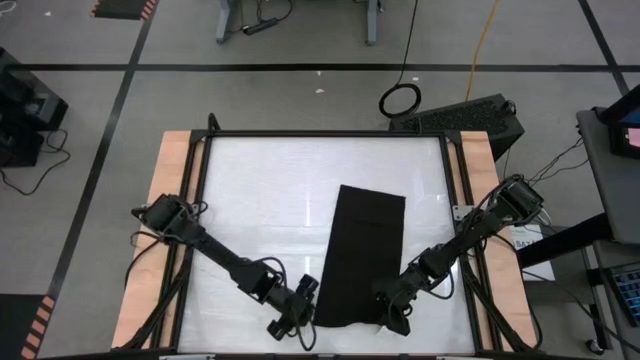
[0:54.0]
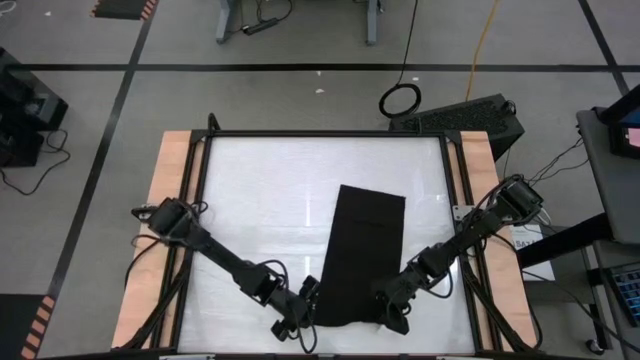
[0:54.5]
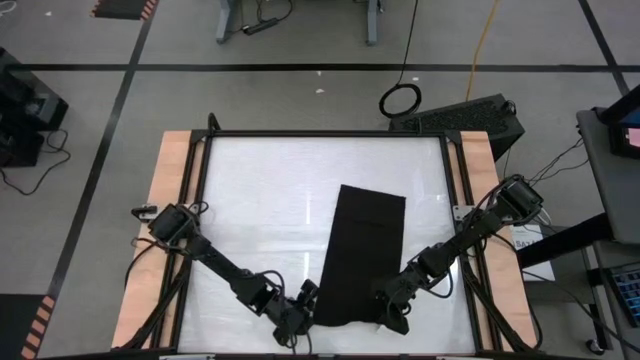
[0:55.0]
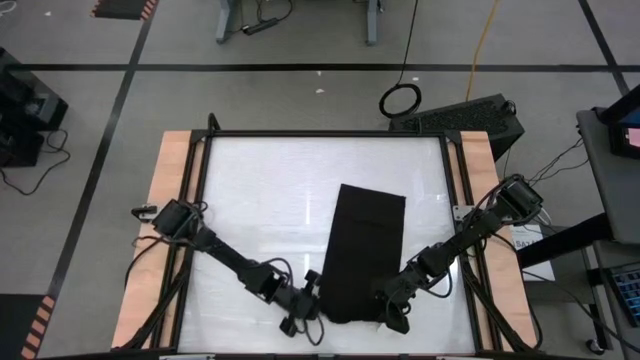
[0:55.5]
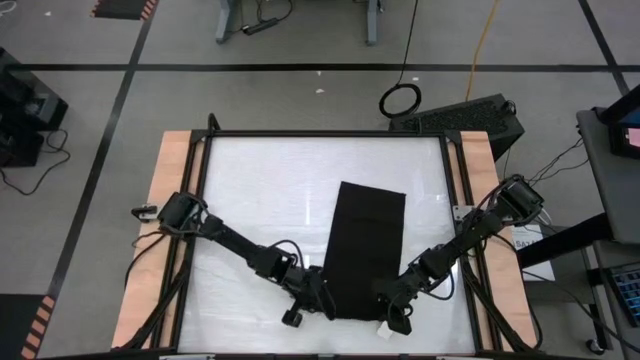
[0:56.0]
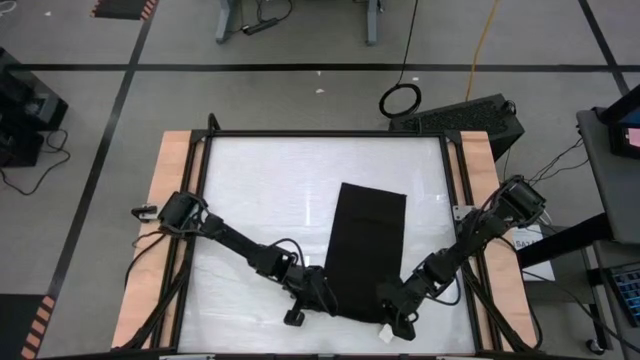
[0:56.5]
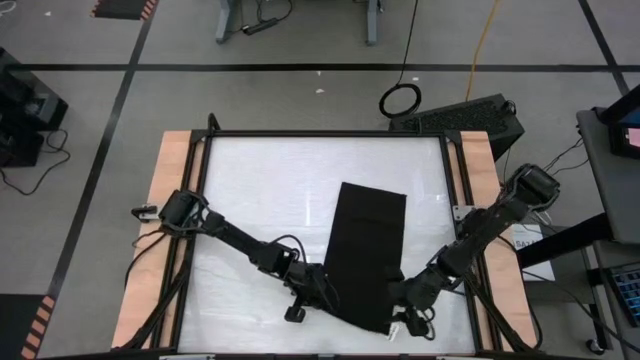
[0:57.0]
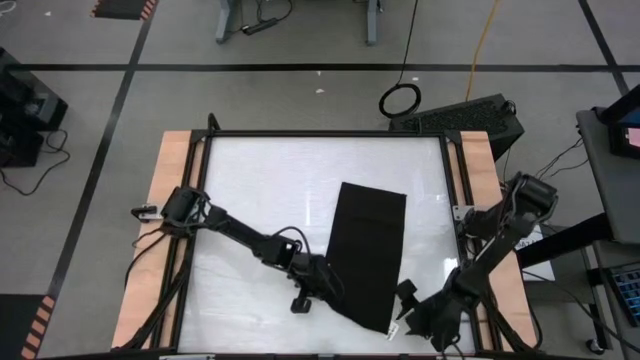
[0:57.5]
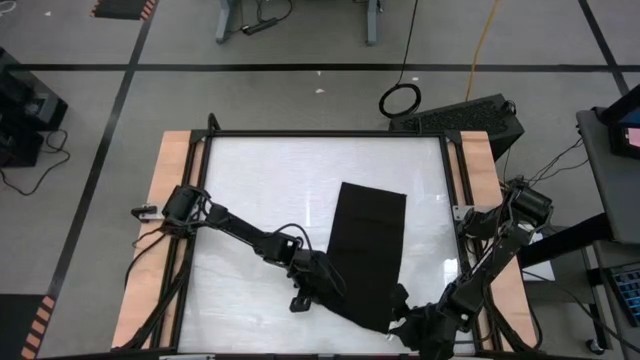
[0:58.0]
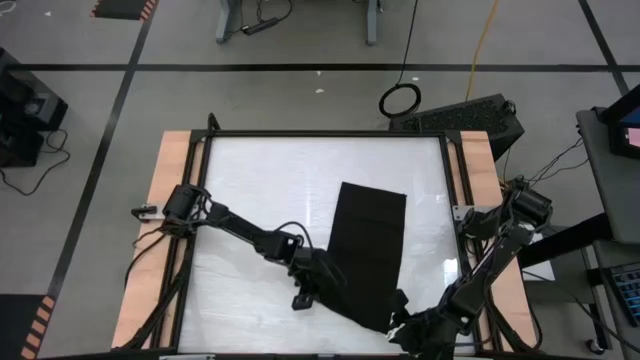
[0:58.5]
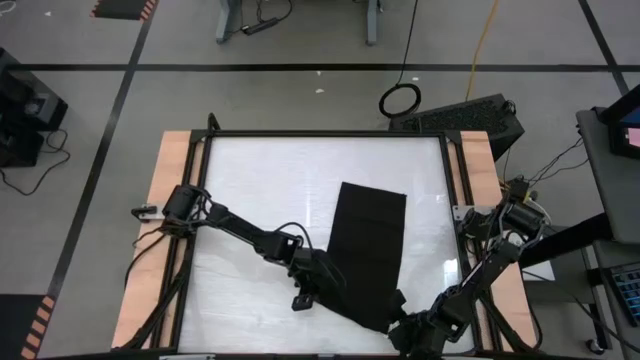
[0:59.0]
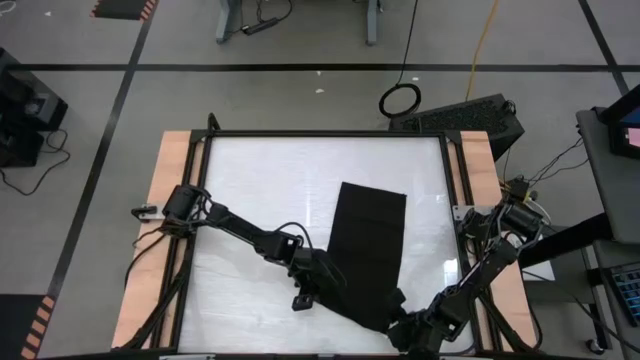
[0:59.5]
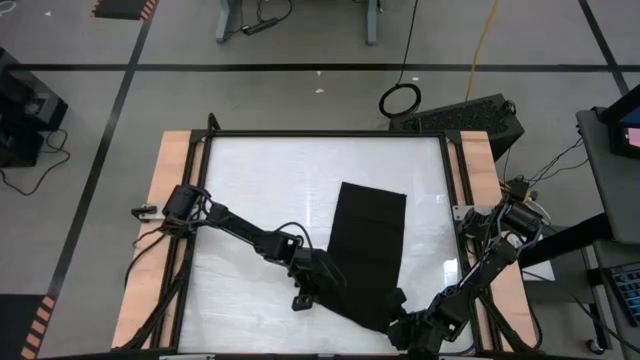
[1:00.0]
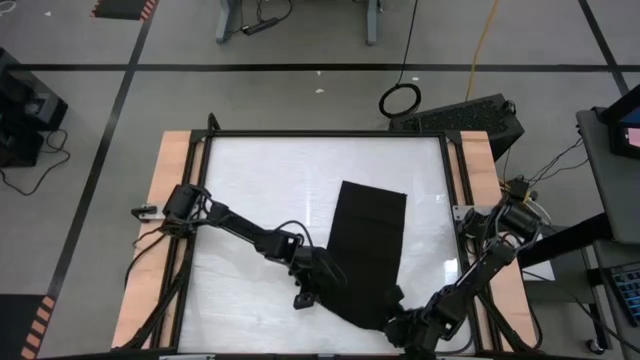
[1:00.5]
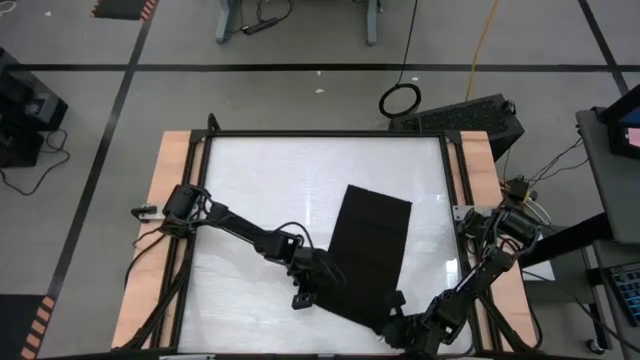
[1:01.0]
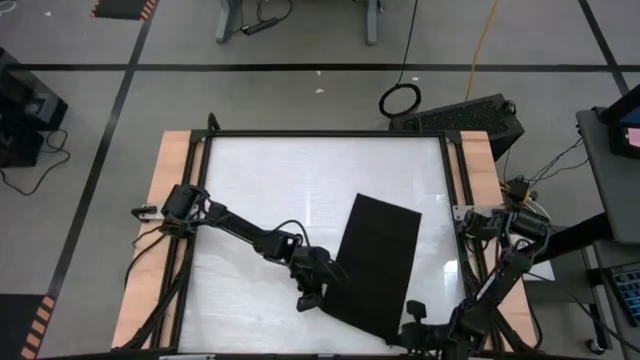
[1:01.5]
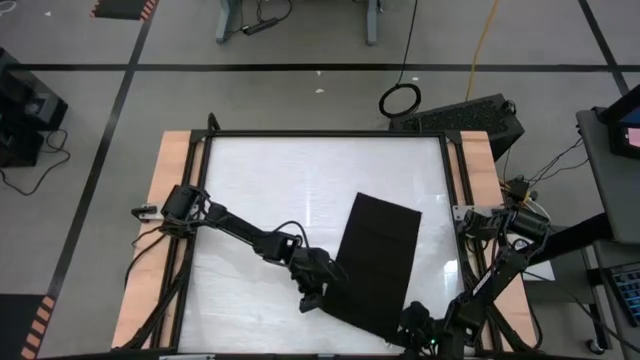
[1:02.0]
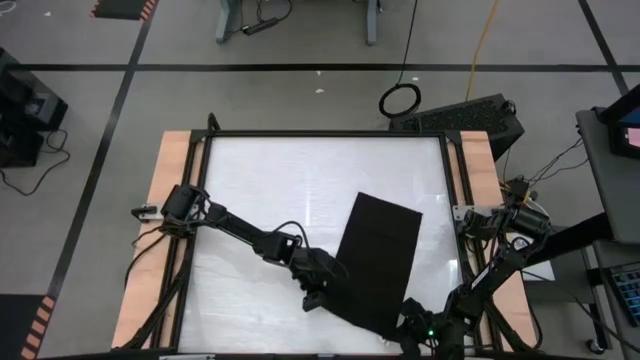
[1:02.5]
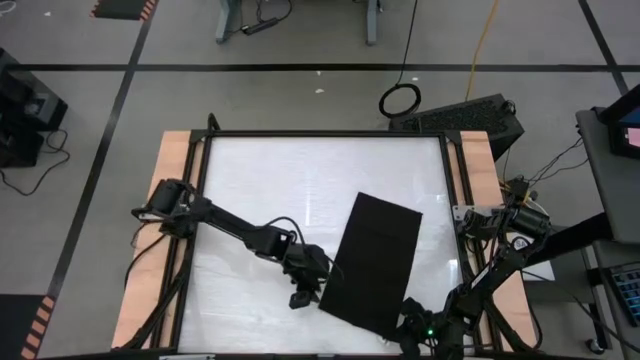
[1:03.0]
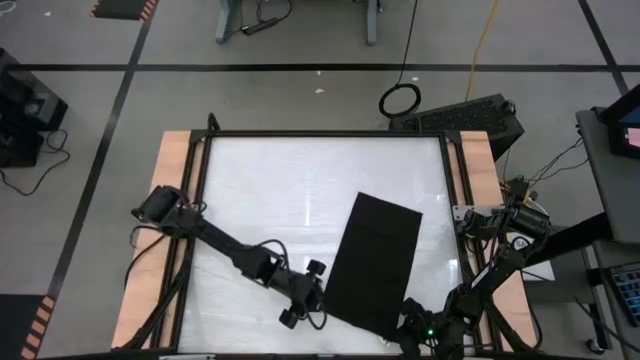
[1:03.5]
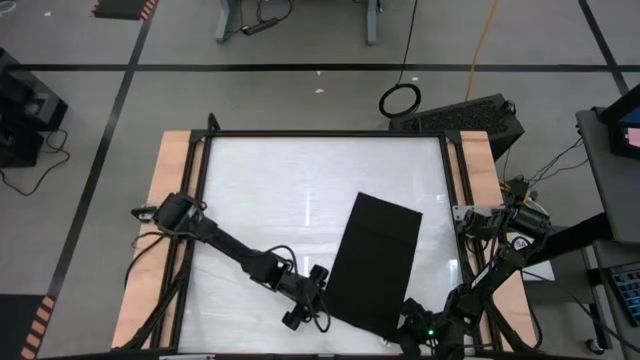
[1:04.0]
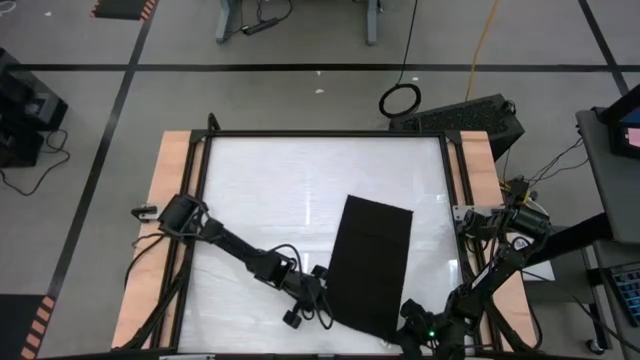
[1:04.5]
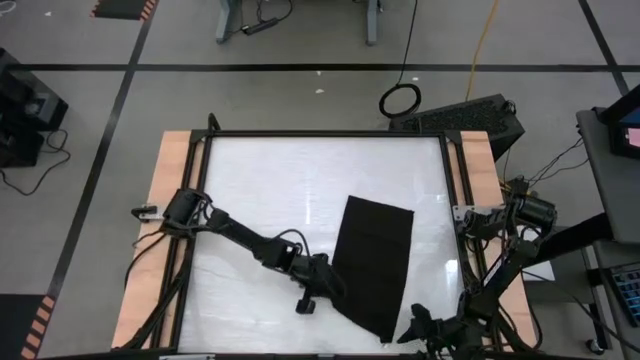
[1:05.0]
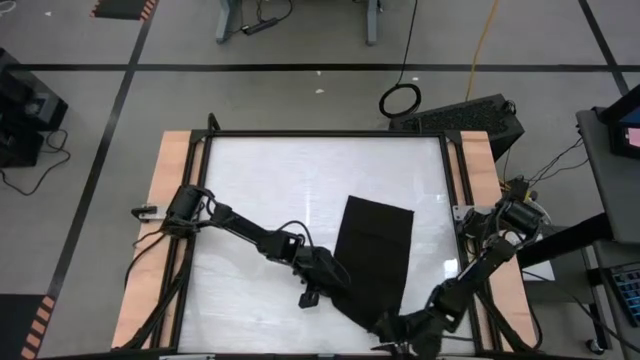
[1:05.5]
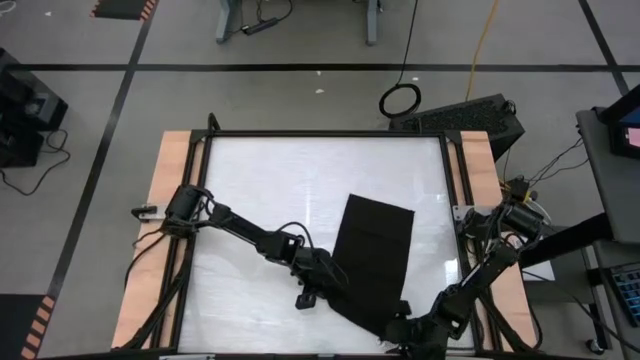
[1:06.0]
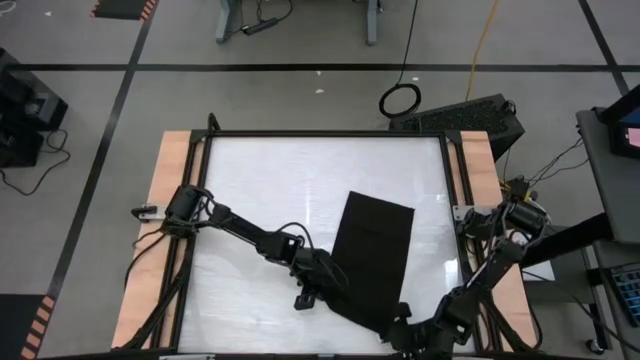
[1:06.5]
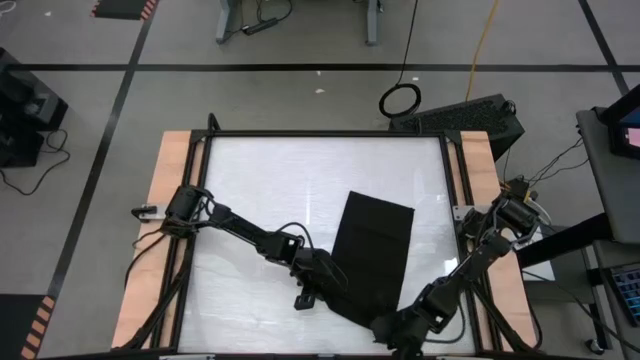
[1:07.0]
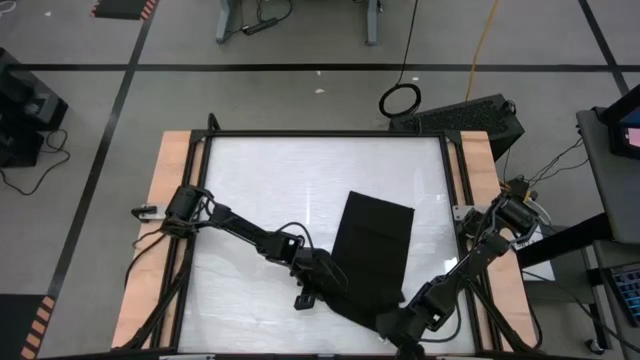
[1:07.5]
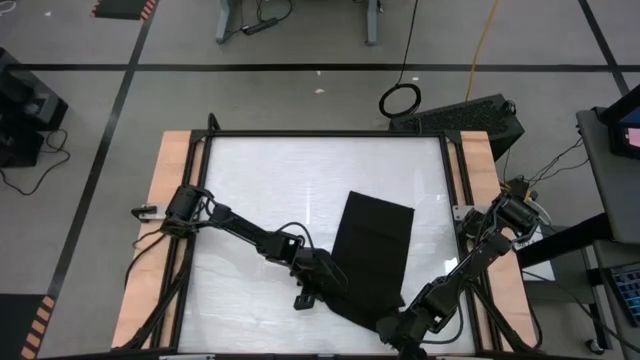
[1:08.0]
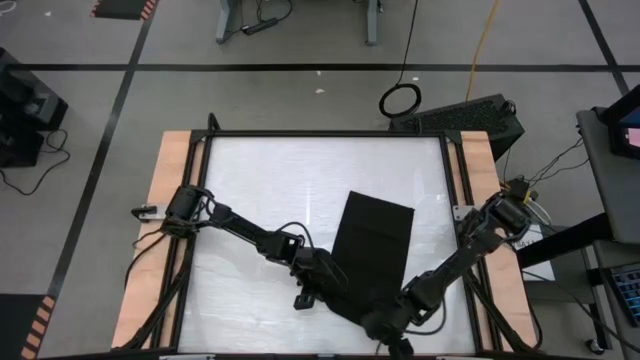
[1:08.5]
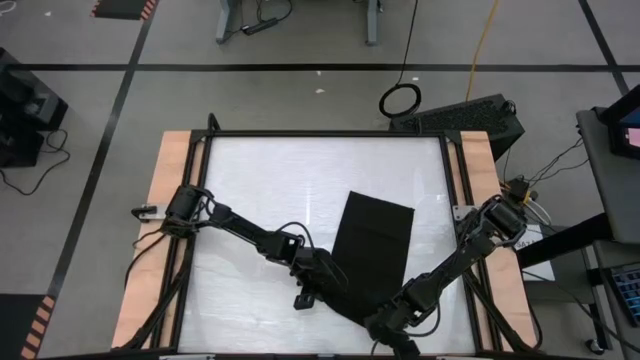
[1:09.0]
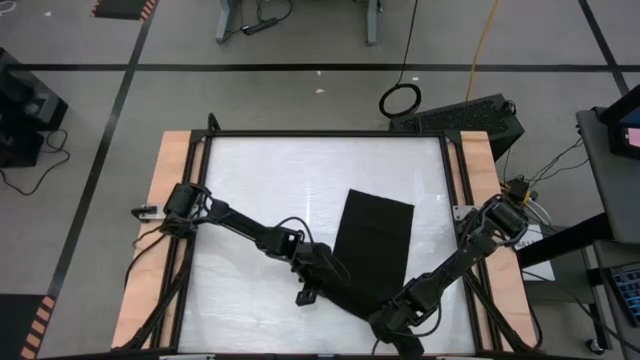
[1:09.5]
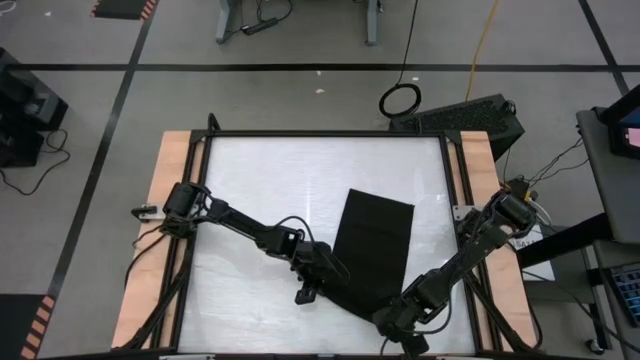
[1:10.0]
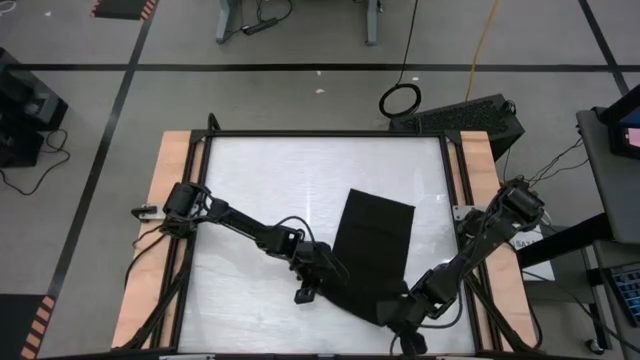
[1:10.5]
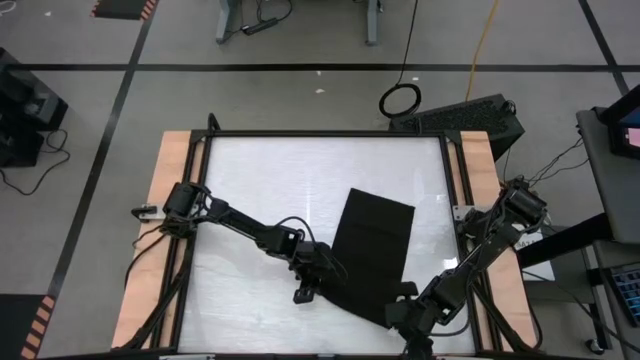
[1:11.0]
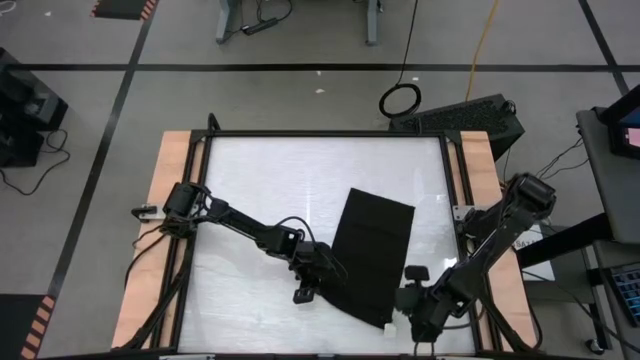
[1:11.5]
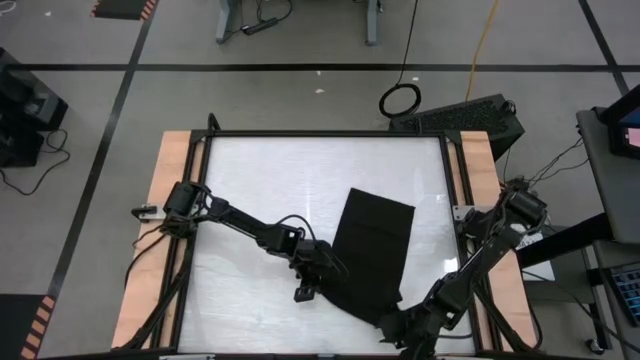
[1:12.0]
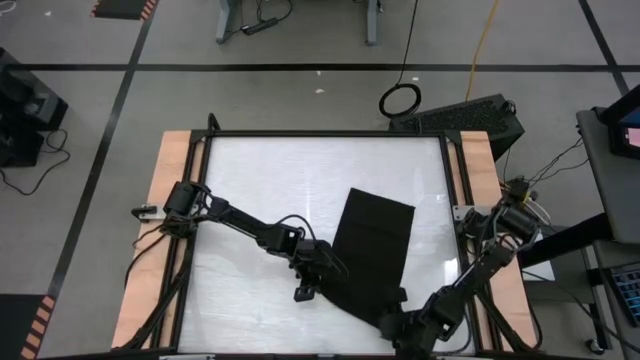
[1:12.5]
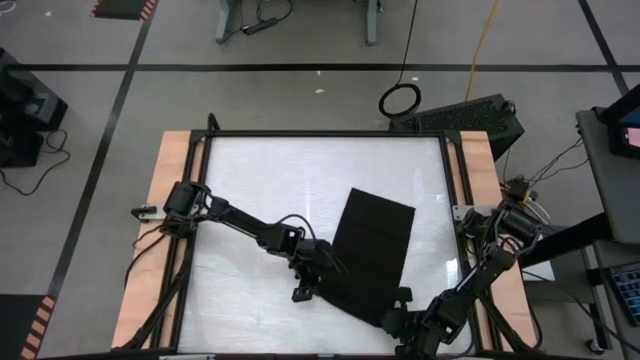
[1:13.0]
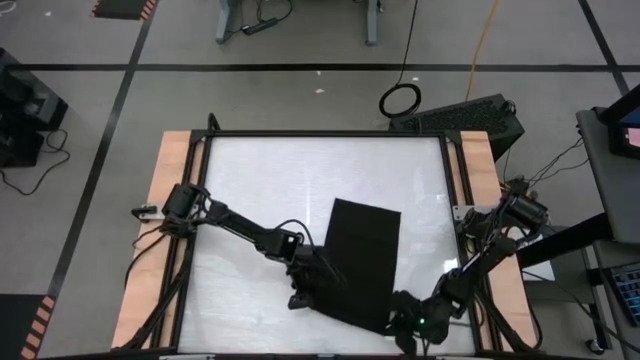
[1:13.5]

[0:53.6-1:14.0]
Task: Roll towel into tight, uniform cylinder
Roll the black towel

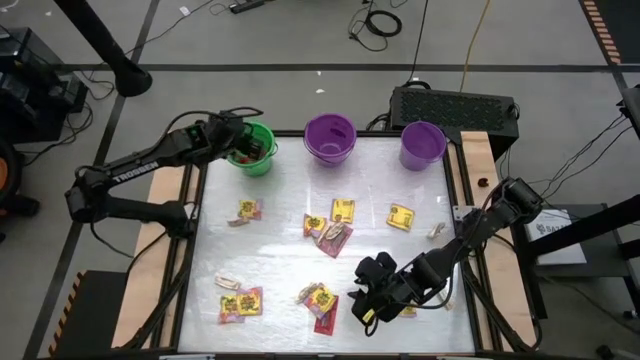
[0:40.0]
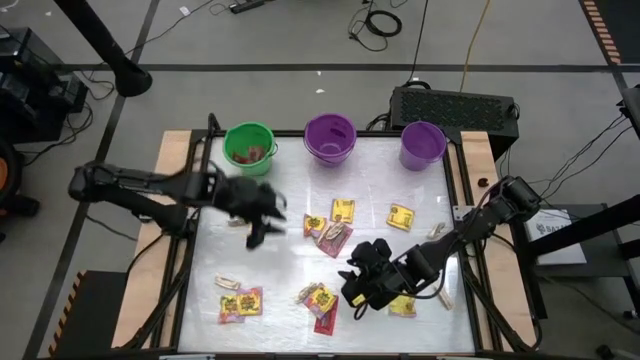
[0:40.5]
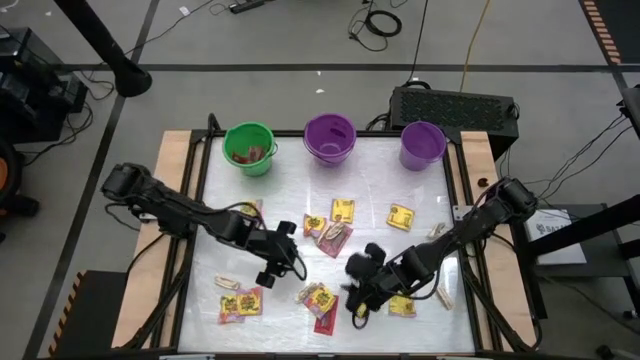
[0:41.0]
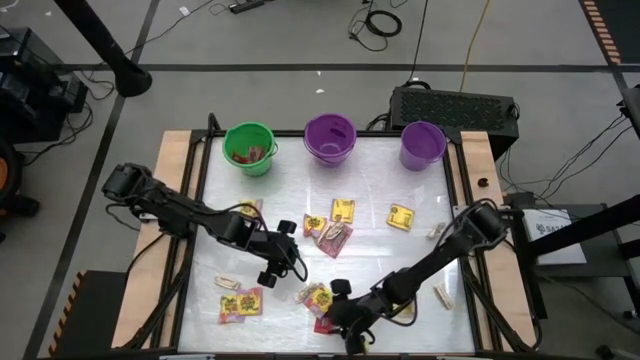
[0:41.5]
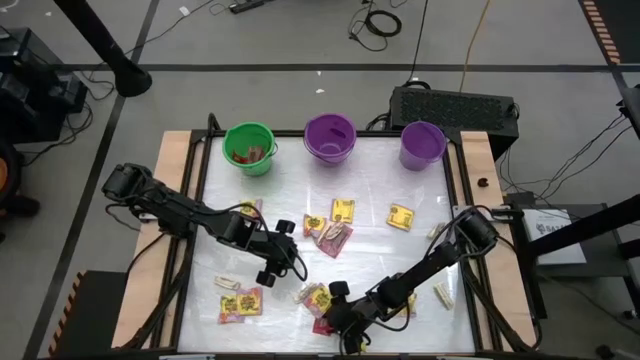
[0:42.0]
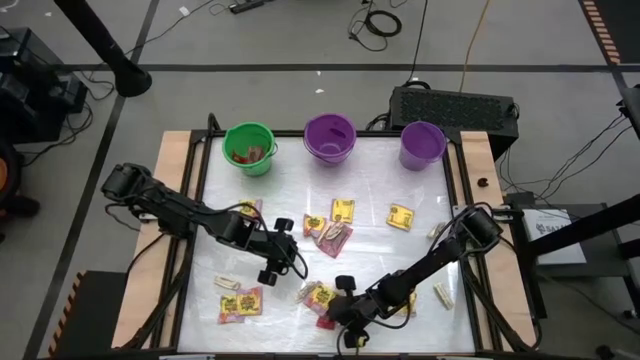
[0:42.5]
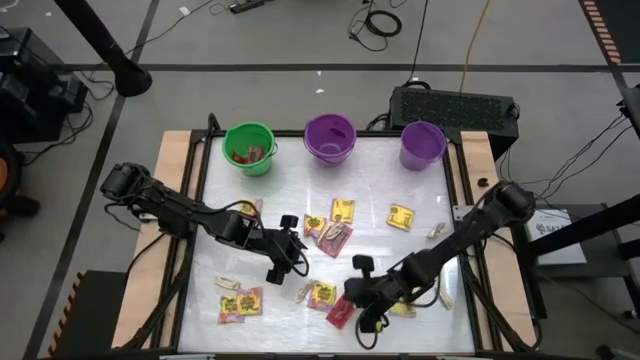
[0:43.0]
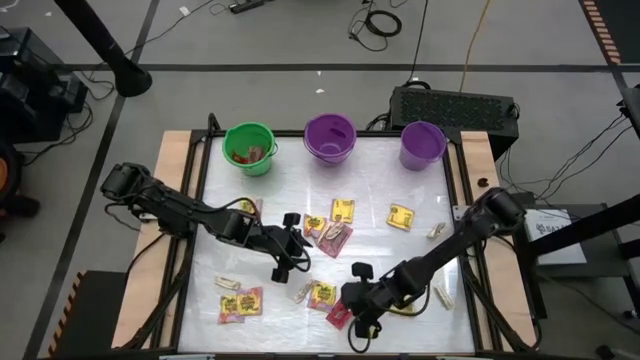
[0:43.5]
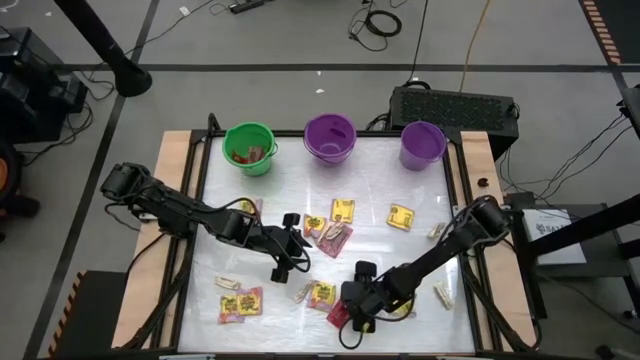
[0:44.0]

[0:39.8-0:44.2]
Task: Sort candy by brand, put in halloween buckets
Put the red candy pack in the green bucket
